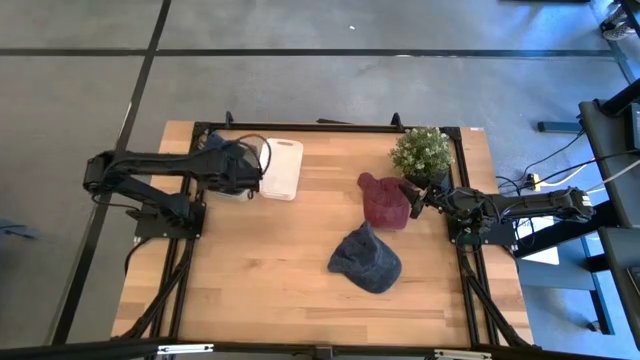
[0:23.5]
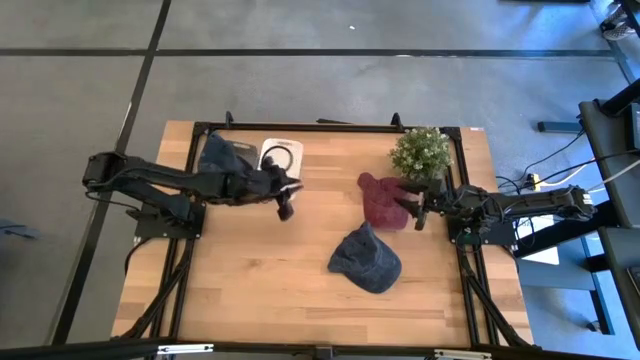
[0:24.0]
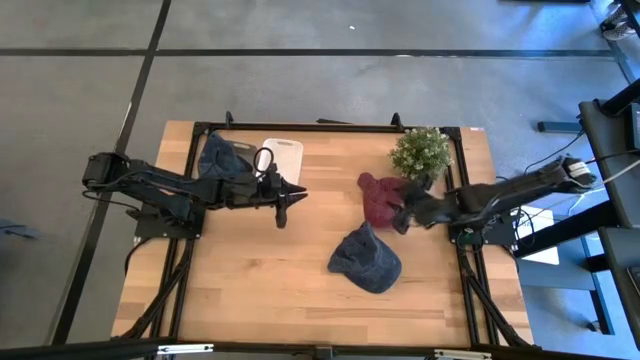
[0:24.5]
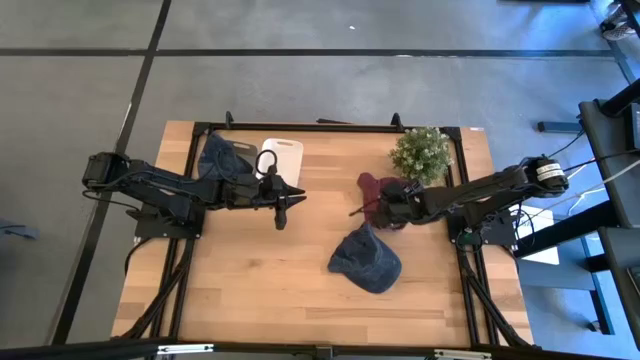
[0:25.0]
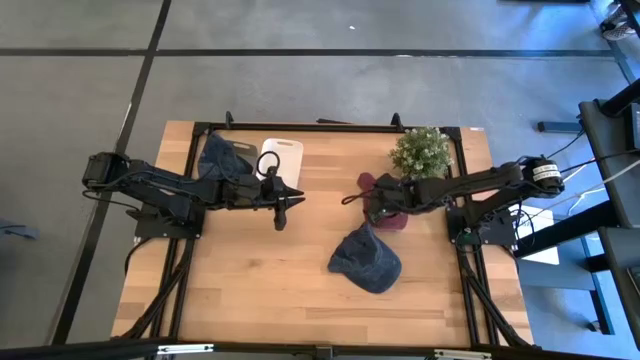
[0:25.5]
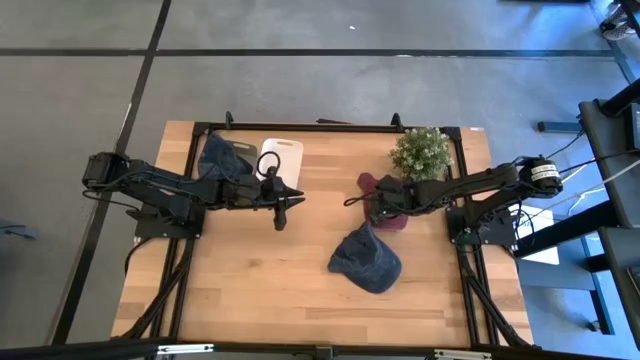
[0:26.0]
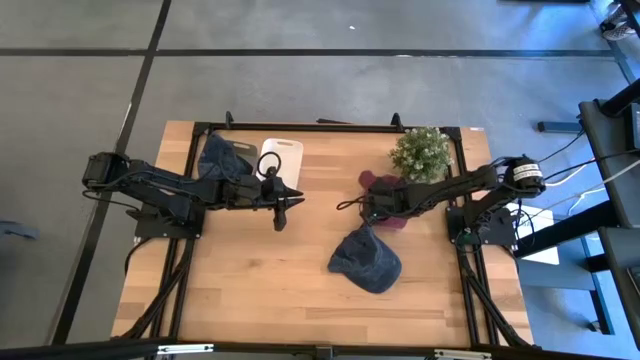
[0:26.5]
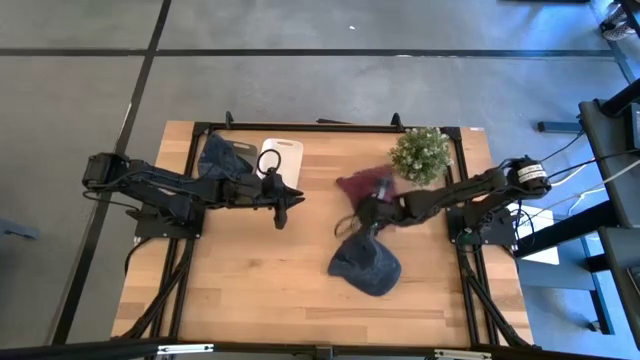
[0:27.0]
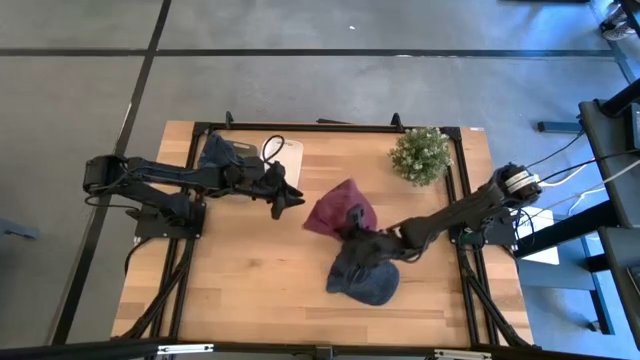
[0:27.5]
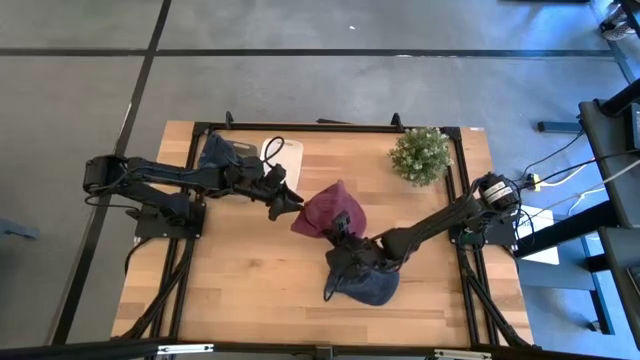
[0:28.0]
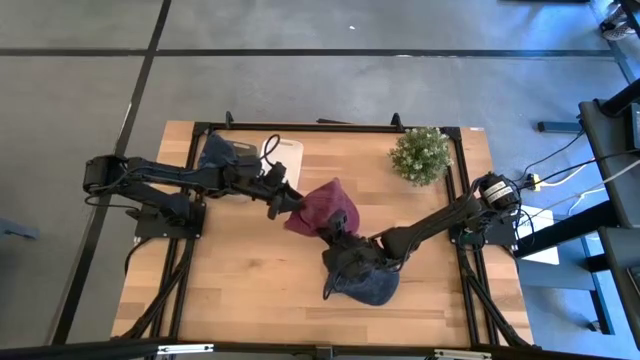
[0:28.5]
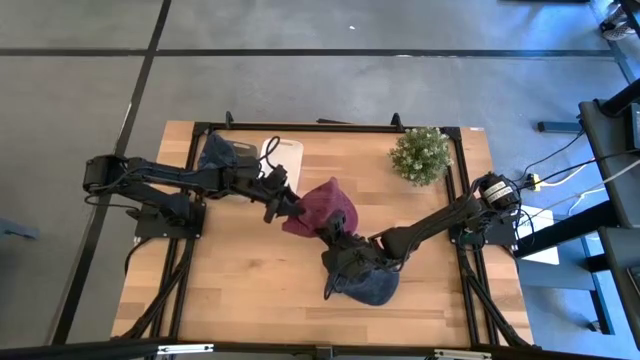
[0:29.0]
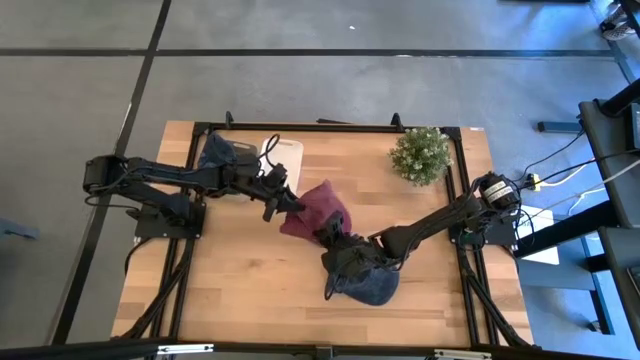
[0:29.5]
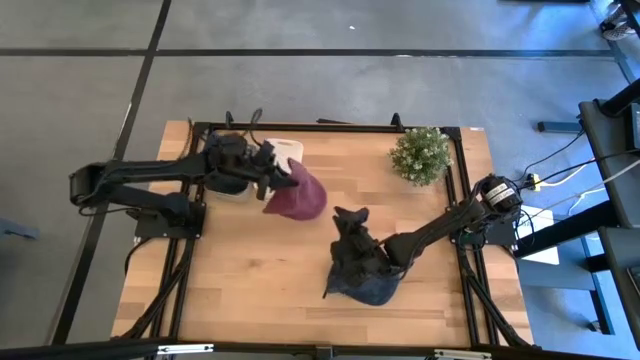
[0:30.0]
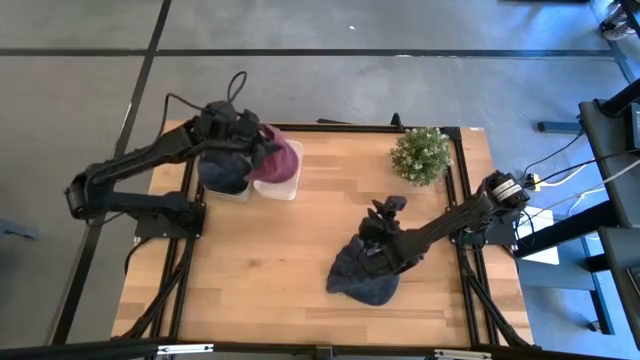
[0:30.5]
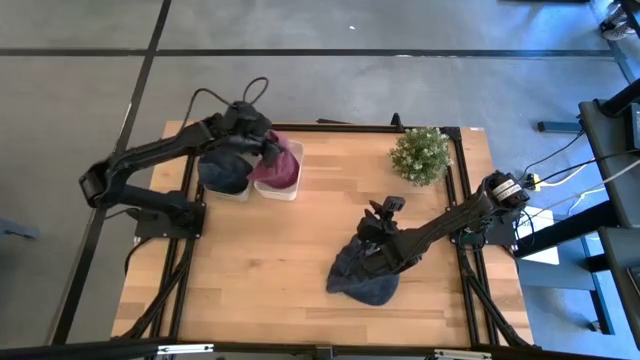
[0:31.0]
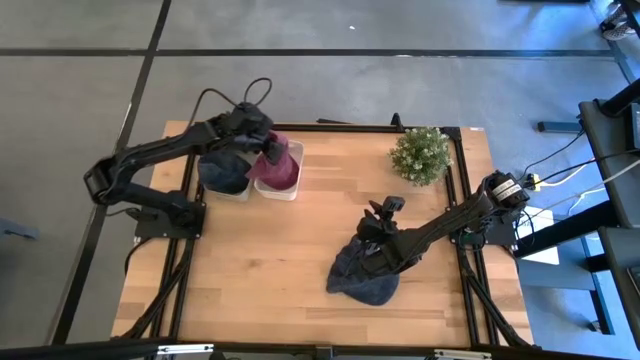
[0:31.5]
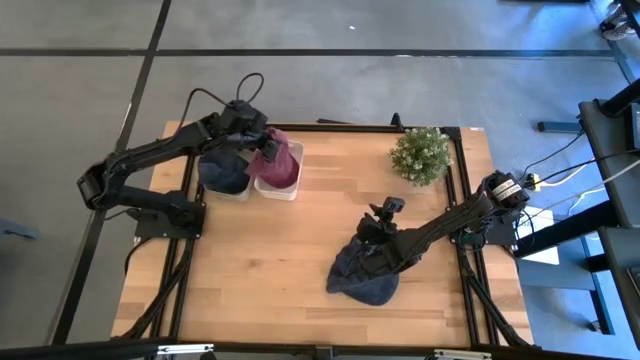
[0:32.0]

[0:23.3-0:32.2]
Task: Pick & Place hat
Put the red cap into the white bin

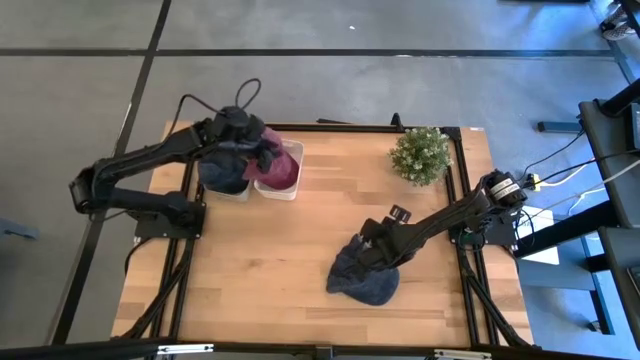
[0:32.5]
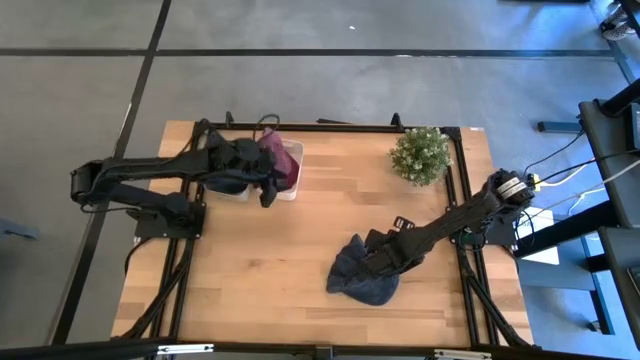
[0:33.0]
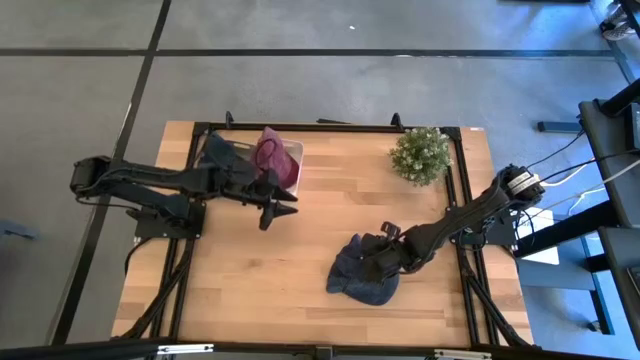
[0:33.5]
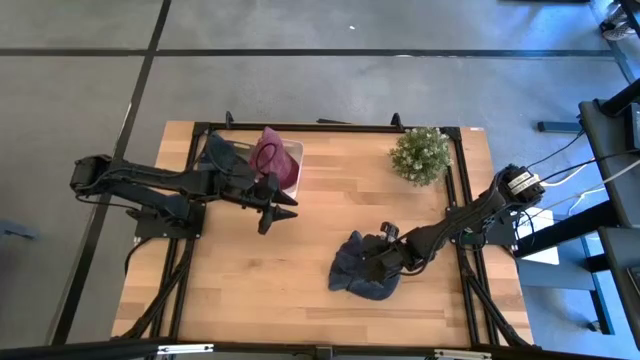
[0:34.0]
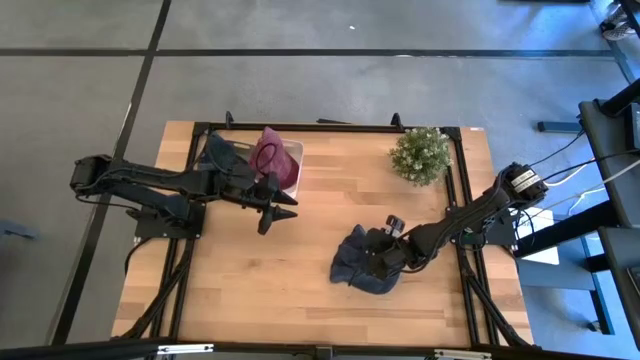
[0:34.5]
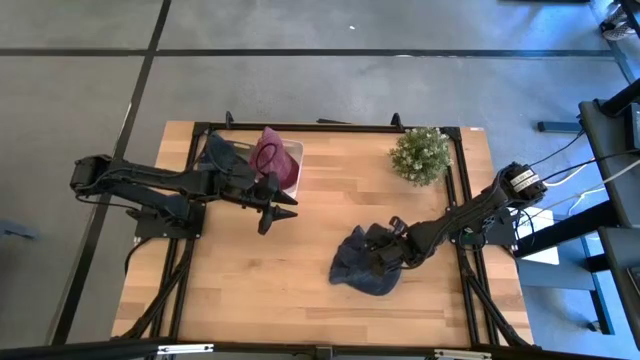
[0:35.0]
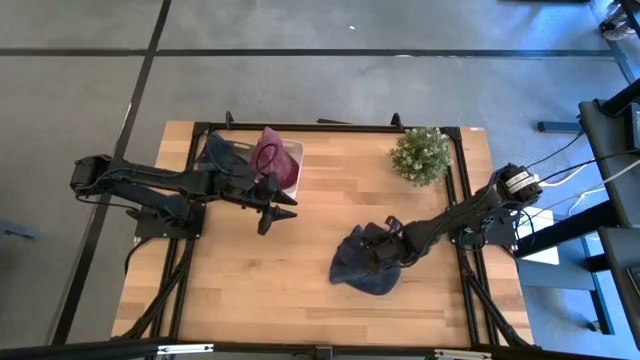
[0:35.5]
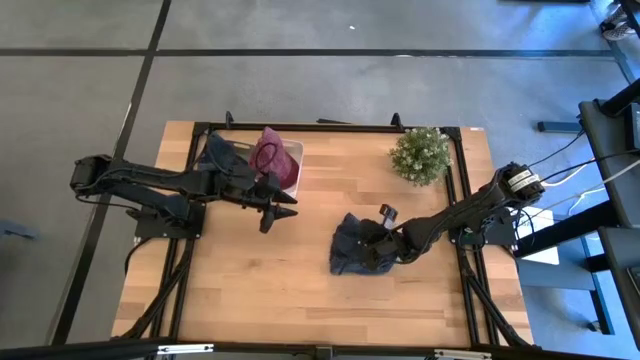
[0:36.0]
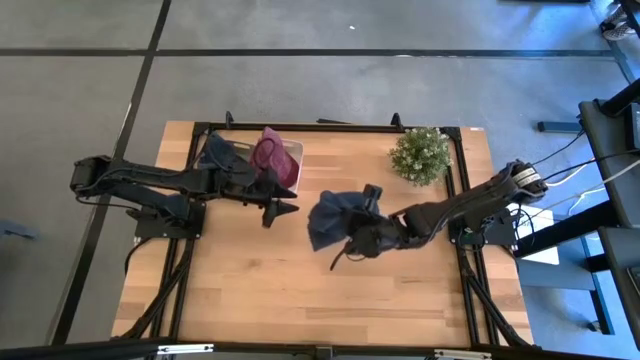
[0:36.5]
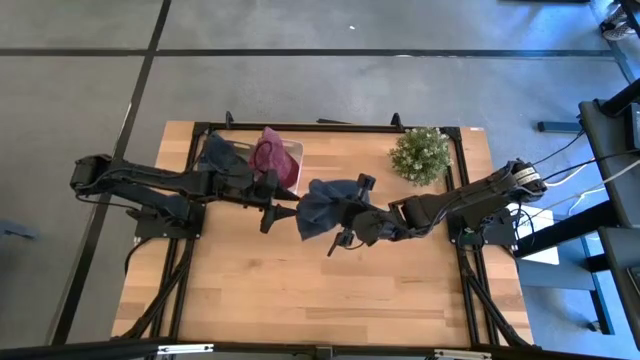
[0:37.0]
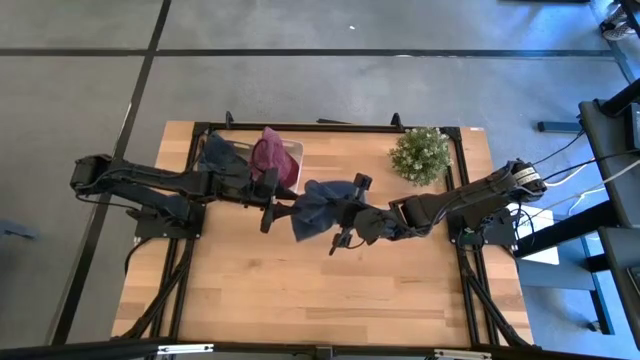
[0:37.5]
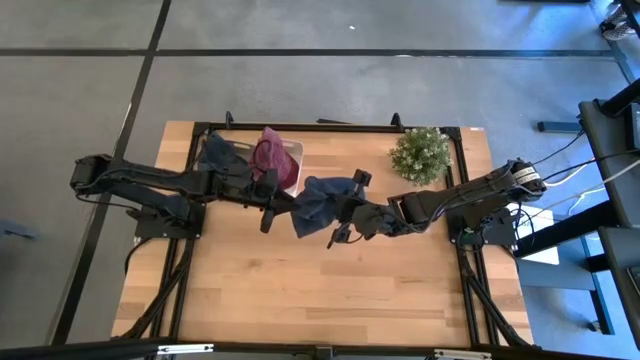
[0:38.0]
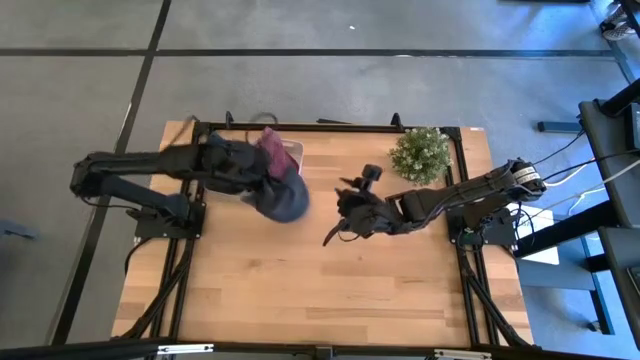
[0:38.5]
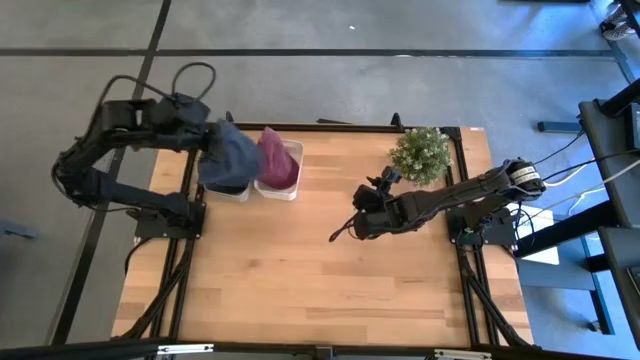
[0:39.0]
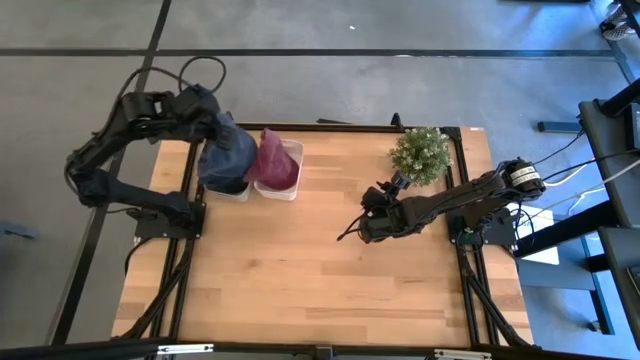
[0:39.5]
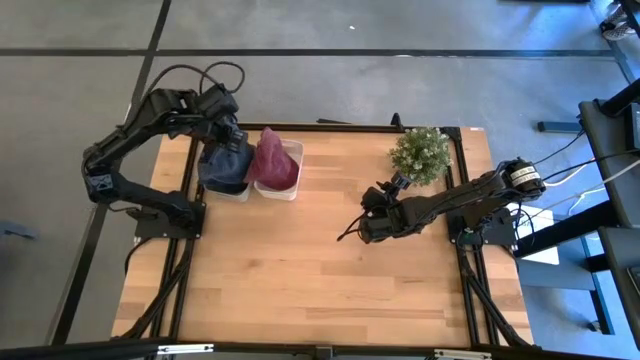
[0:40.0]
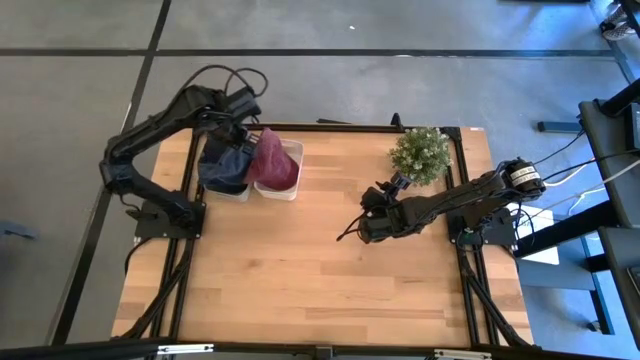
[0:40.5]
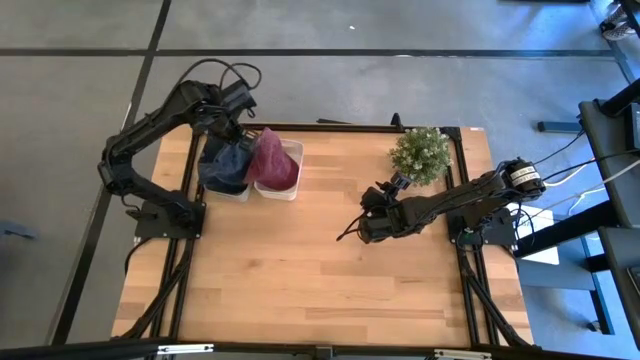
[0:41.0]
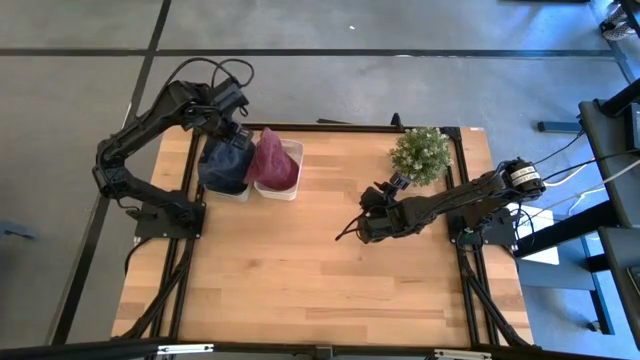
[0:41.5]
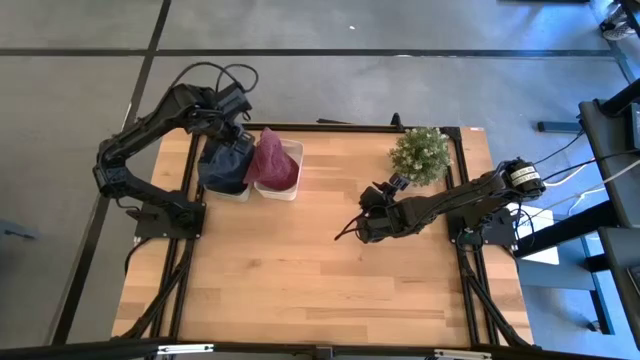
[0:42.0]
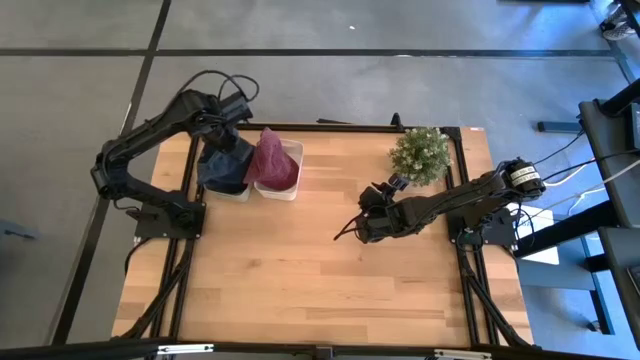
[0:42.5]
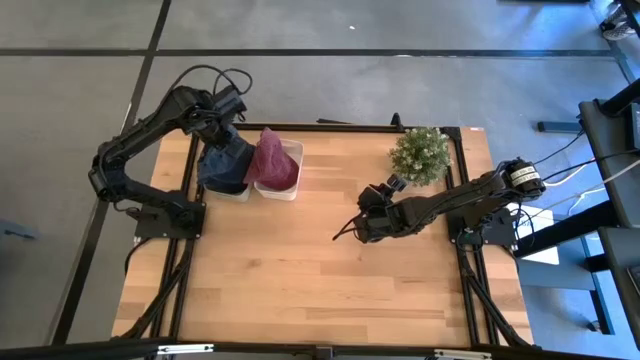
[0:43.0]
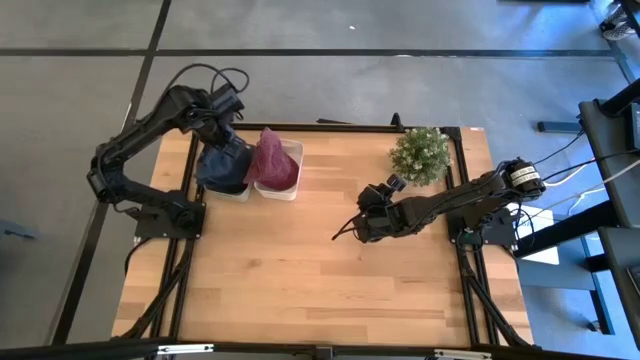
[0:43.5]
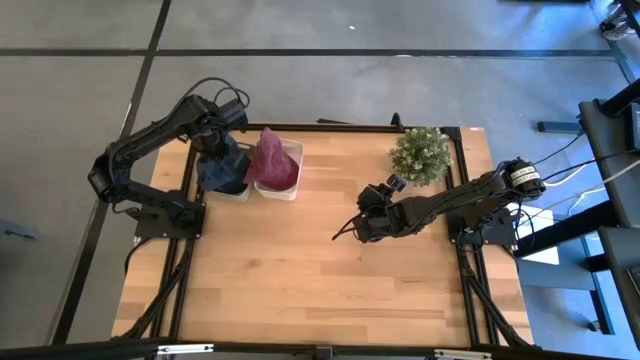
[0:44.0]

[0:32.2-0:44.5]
Put the blue cap into the gray bin
